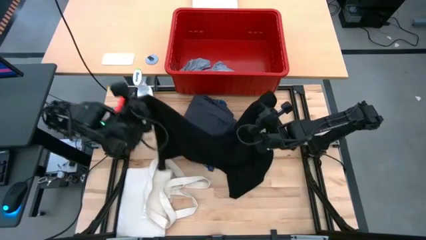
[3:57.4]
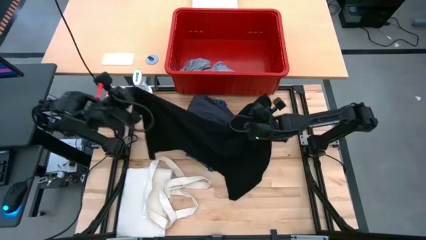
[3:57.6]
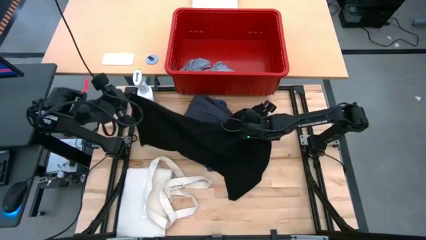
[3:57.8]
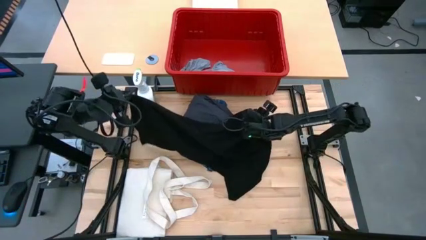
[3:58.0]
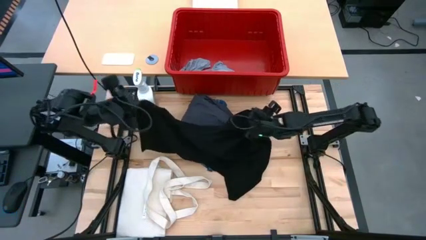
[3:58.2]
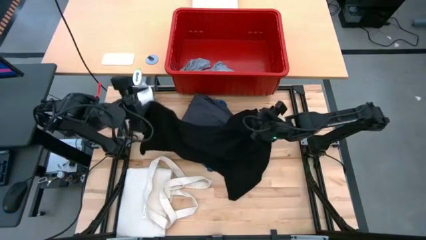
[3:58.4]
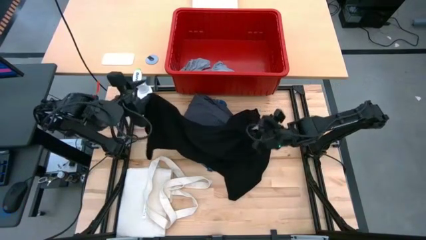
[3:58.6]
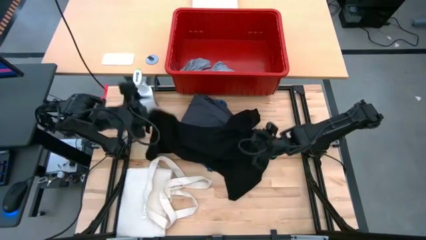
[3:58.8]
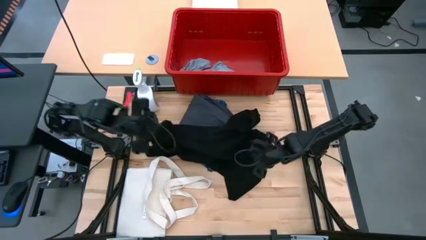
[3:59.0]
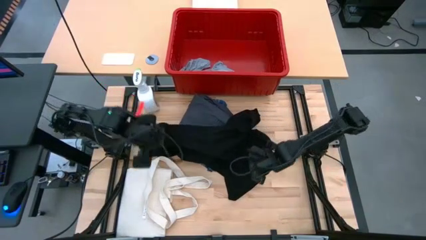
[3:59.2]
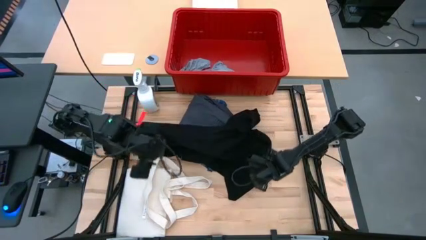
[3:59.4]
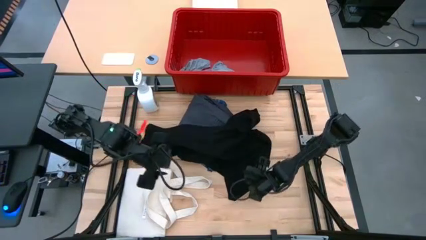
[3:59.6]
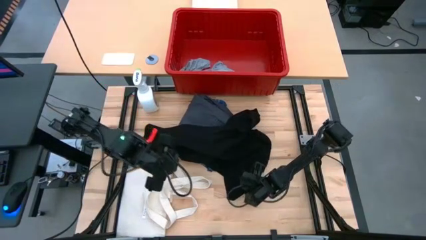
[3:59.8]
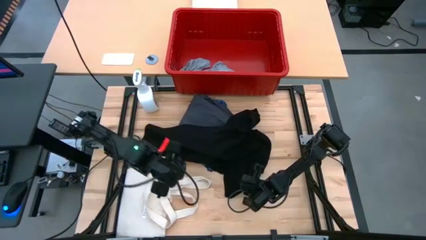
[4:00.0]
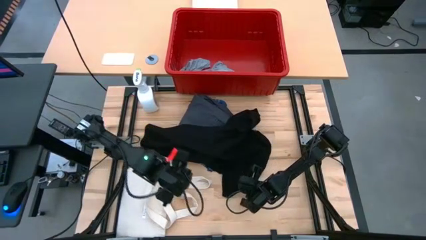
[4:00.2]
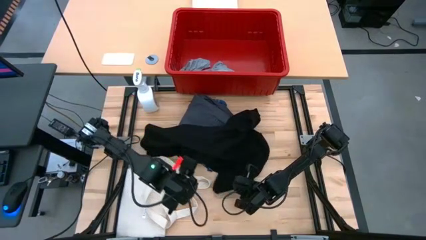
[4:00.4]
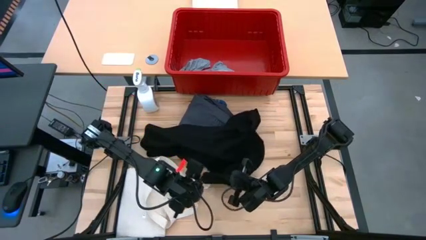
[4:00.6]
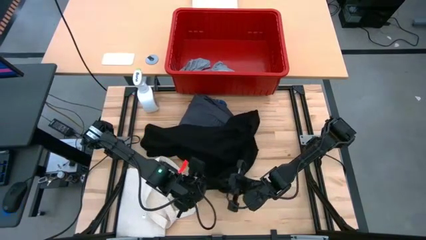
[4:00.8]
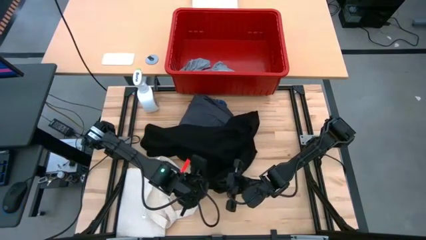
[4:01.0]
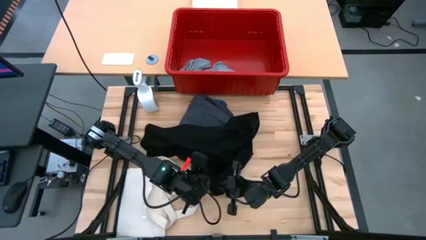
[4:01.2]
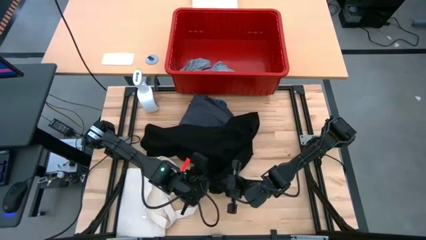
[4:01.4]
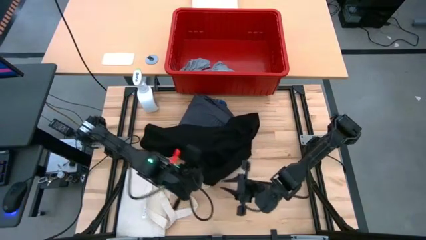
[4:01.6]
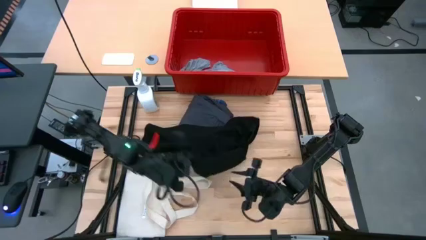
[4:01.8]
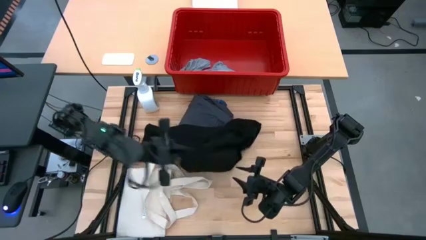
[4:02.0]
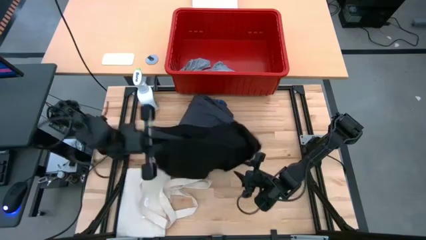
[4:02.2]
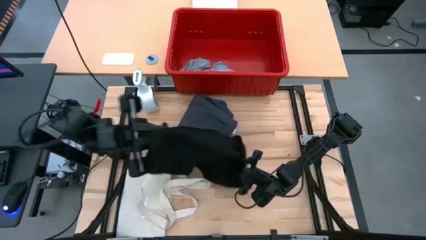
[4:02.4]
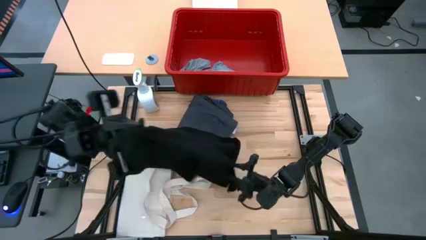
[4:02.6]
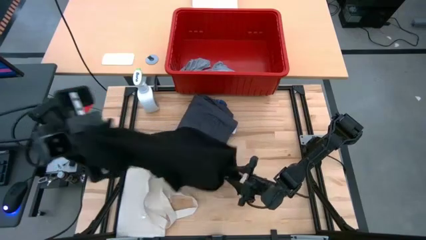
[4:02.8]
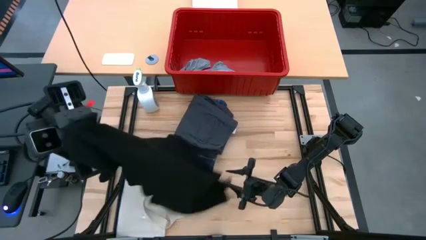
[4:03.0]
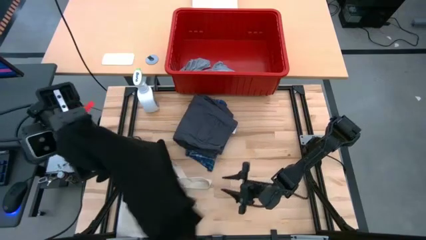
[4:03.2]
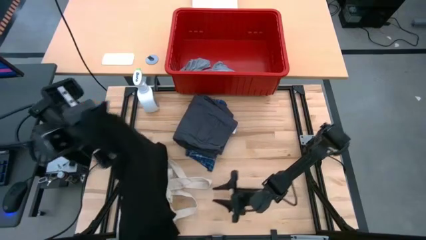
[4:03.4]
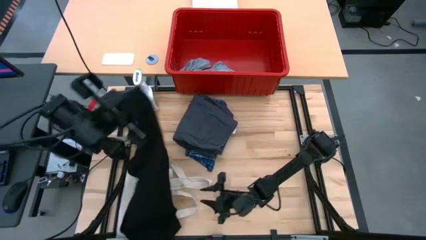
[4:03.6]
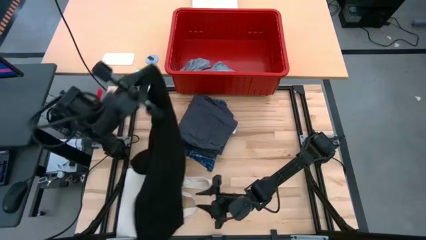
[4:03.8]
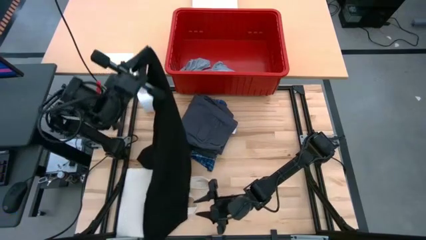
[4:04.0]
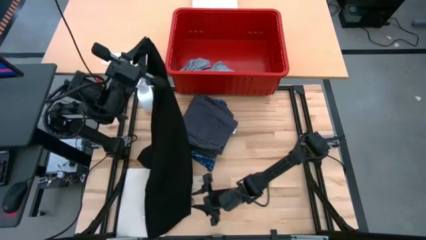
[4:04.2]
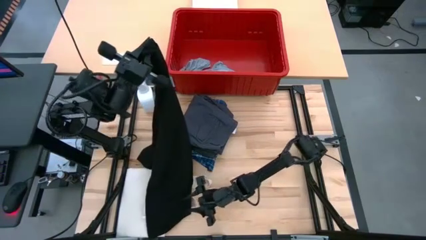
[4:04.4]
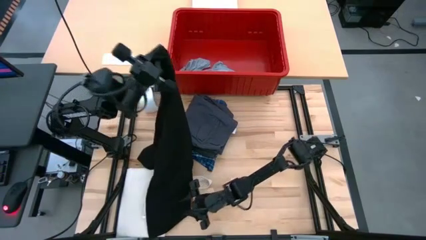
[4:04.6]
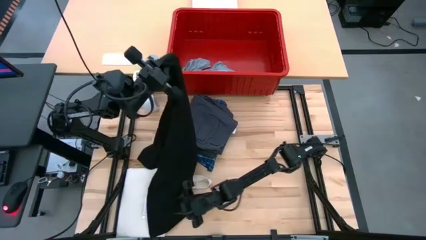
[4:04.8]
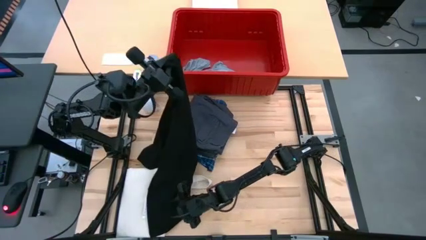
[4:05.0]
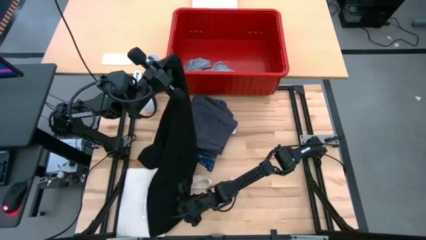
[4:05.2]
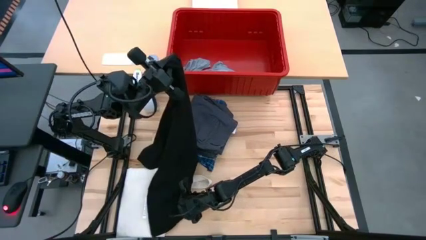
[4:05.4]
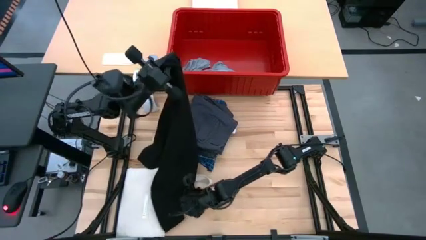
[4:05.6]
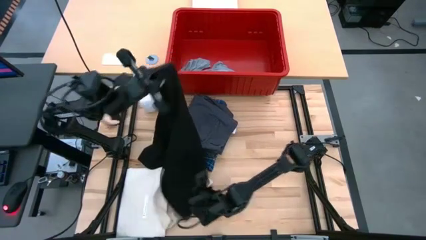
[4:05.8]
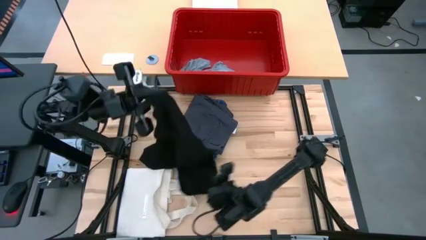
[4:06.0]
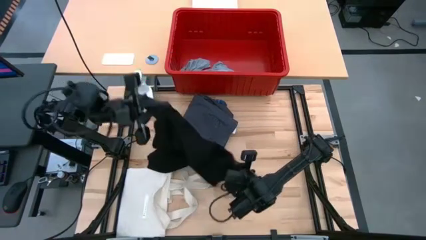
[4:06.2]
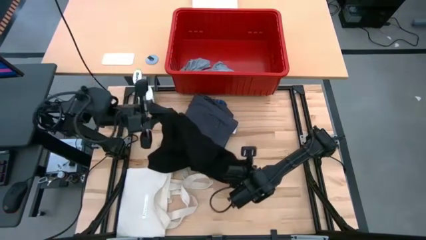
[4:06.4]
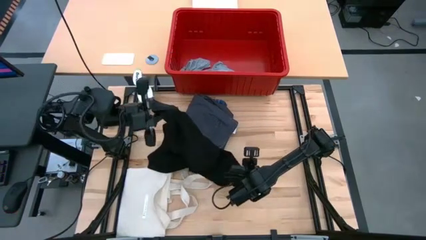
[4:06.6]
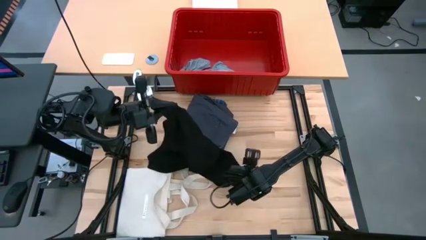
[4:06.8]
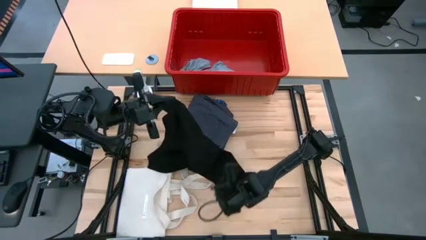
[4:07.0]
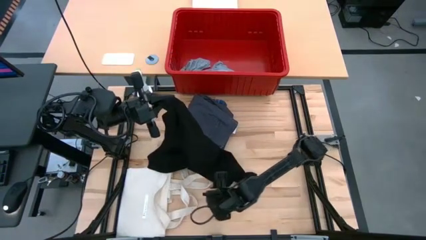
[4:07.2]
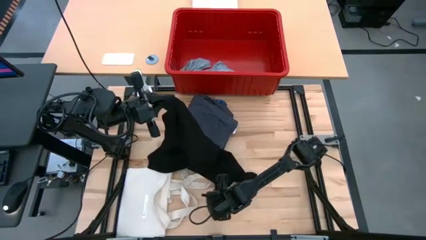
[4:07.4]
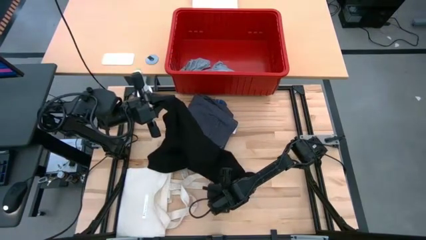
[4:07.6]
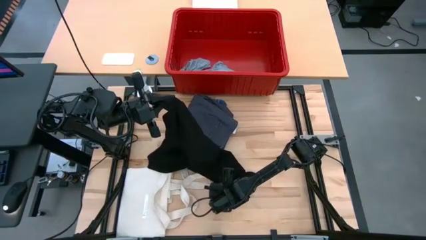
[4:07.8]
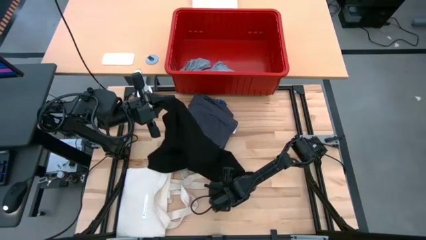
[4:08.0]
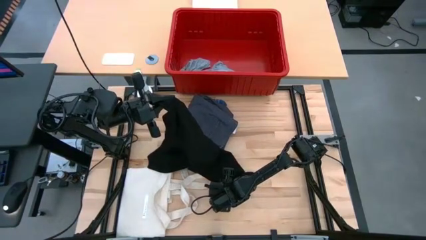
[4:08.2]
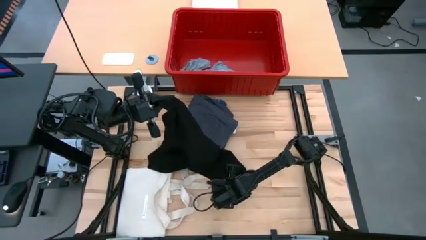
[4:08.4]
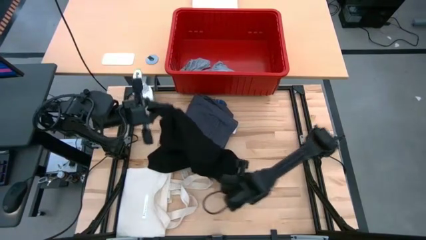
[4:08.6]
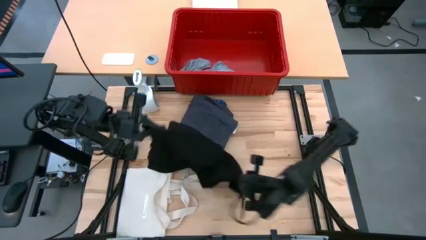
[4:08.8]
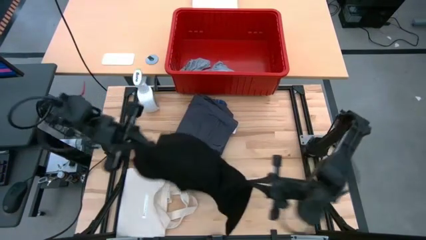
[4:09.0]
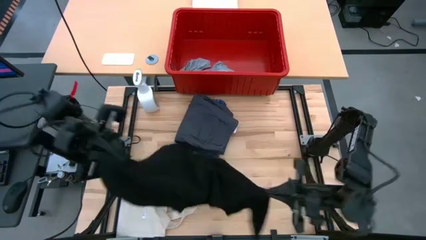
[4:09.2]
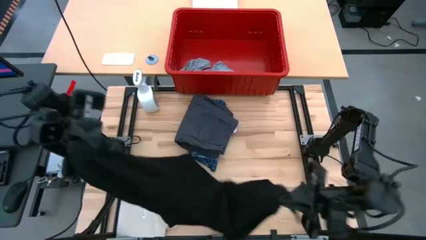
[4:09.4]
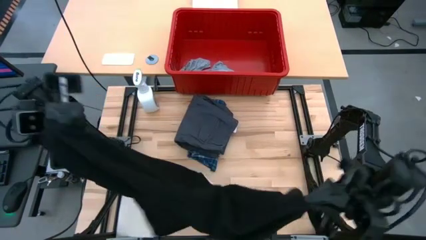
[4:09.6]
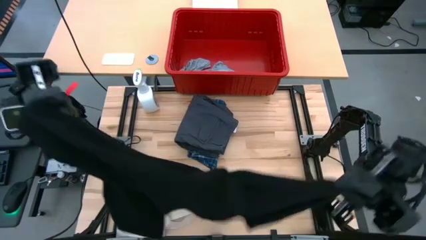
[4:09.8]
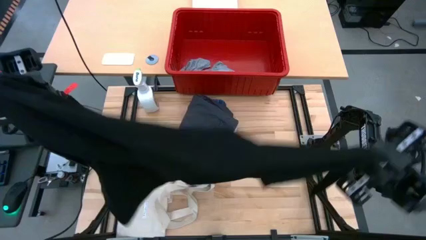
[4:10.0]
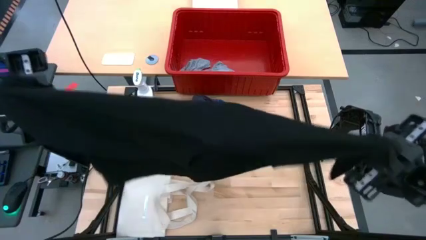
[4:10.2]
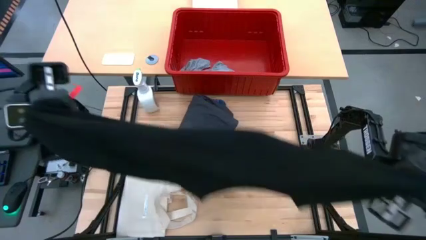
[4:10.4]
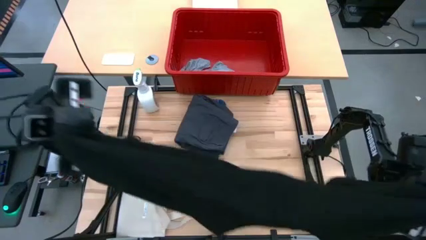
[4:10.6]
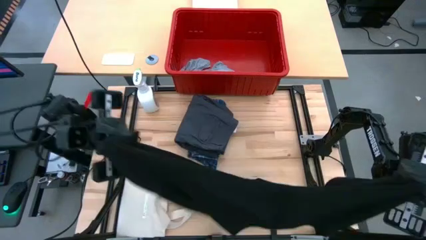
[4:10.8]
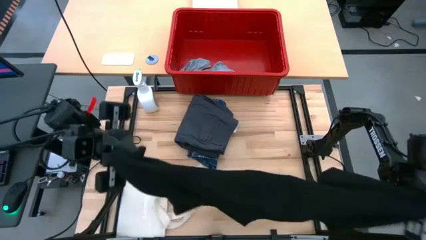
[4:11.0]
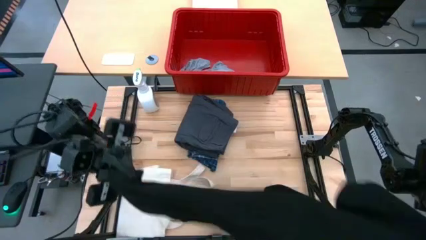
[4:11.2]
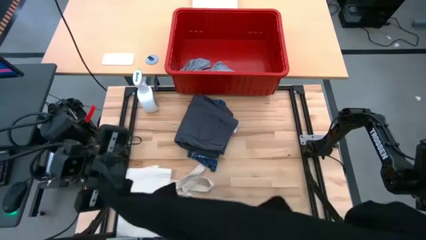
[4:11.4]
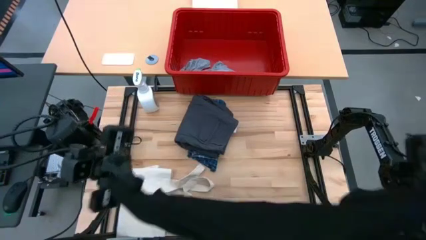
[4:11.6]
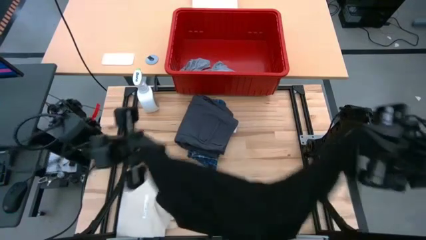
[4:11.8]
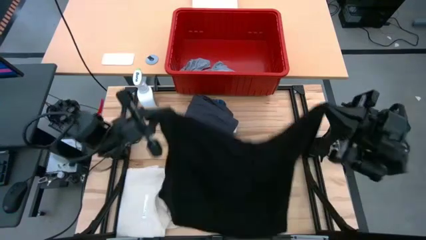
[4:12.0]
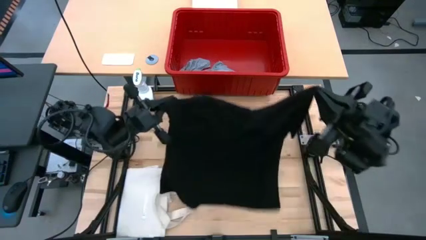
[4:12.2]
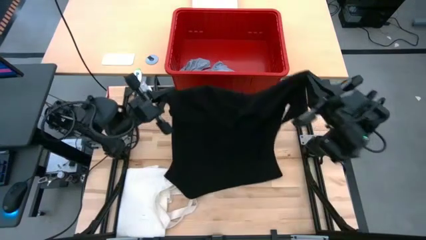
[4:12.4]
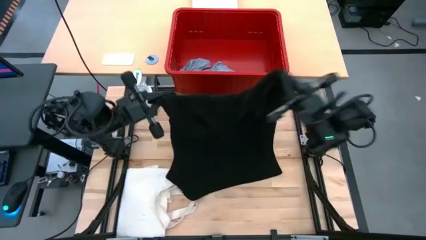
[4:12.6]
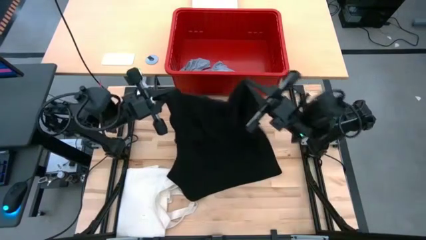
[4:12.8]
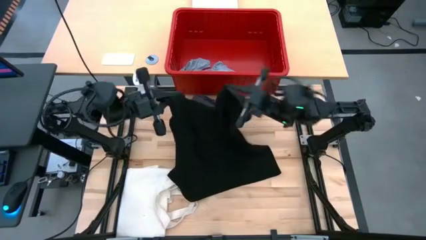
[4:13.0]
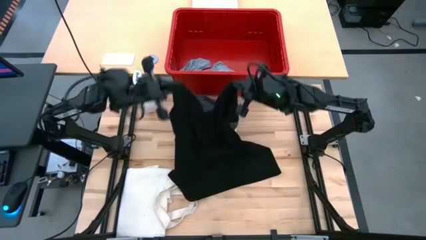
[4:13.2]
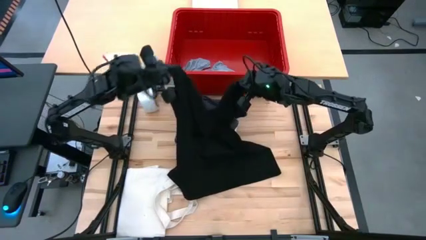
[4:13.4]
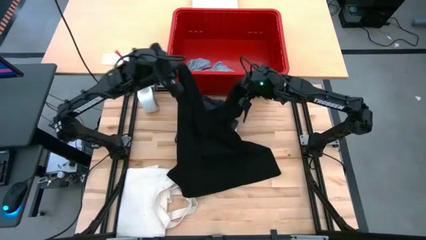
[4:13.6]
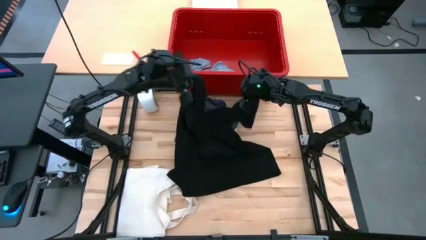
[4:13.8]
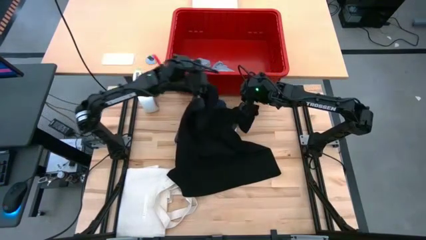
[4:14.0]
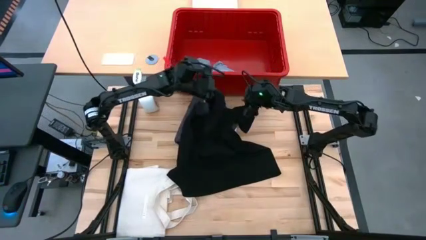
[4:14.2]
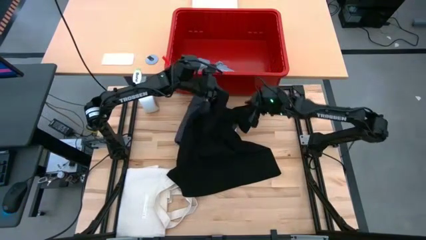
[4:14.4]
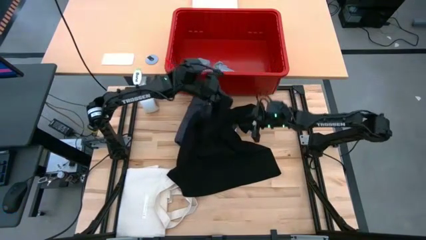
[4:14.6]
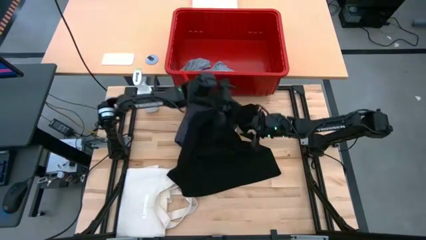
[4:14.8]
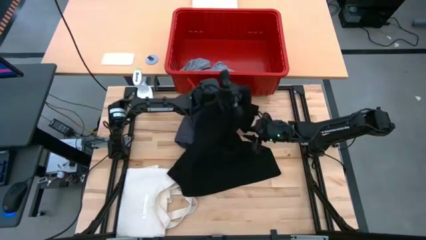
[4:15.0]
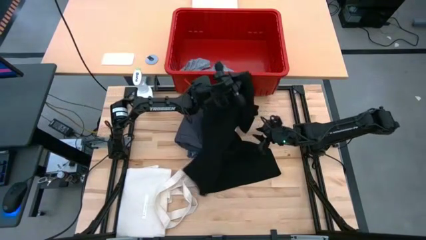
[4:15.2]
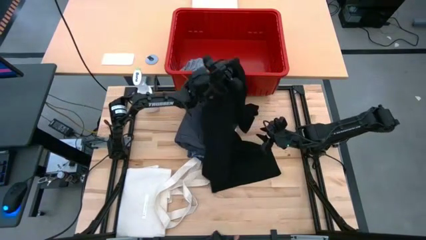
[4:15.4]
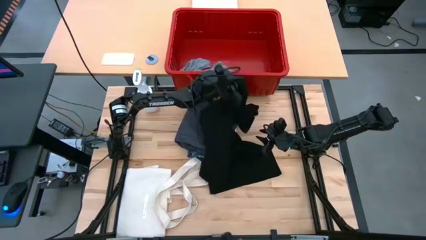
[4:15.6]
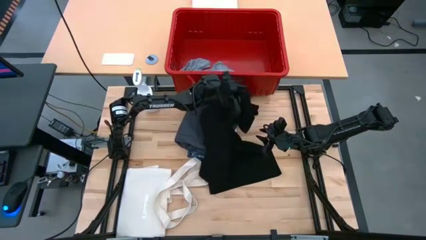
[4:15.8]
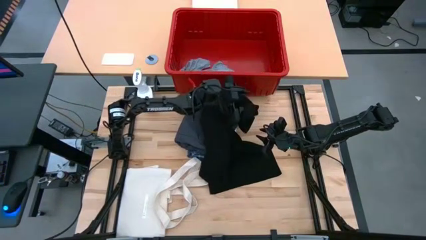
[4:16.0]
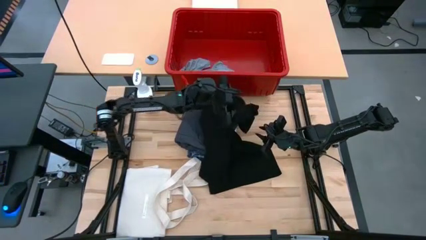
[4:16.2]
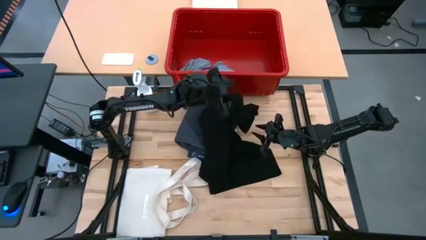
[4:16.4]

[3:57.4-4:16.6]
Task: Fold Laundry from Bin
Fold the black shirt
